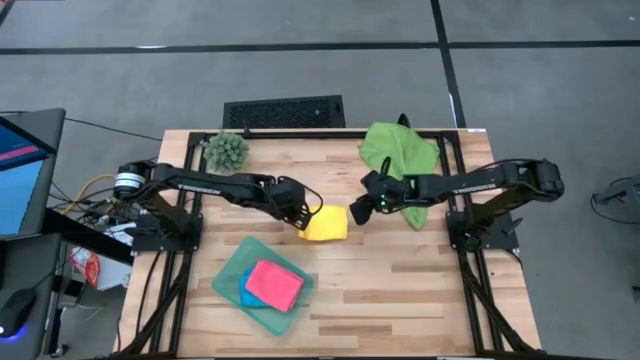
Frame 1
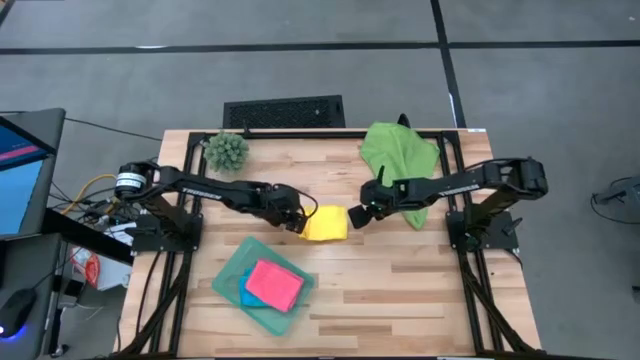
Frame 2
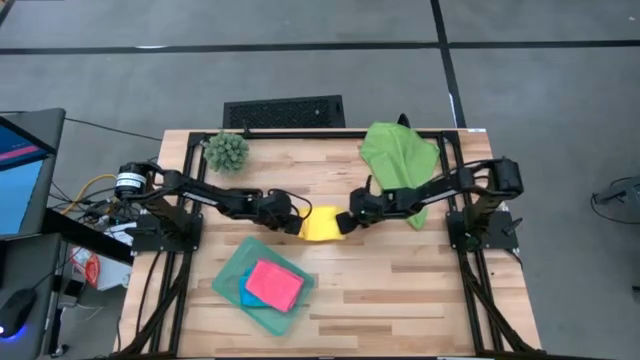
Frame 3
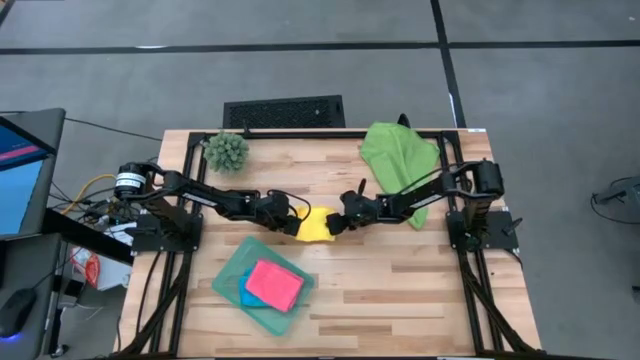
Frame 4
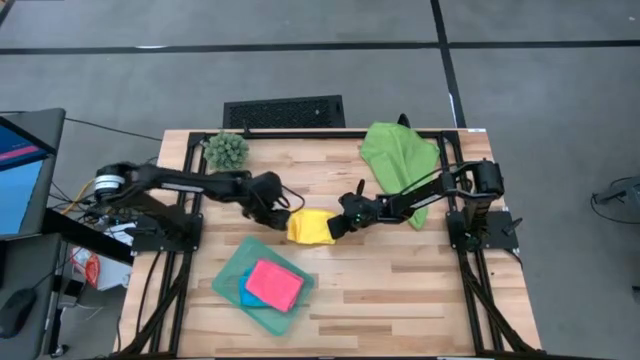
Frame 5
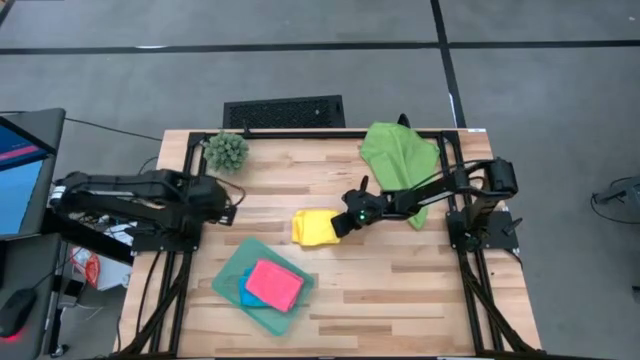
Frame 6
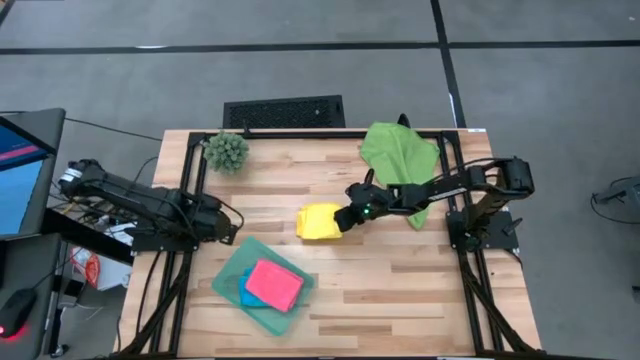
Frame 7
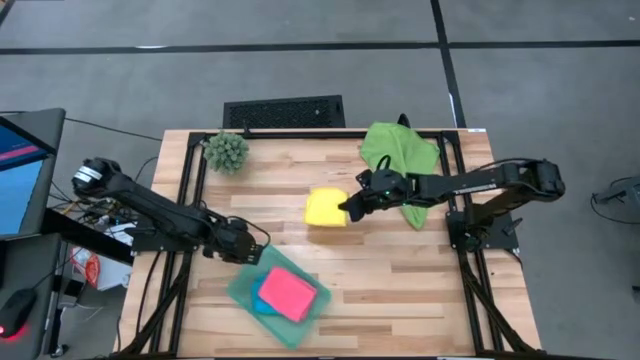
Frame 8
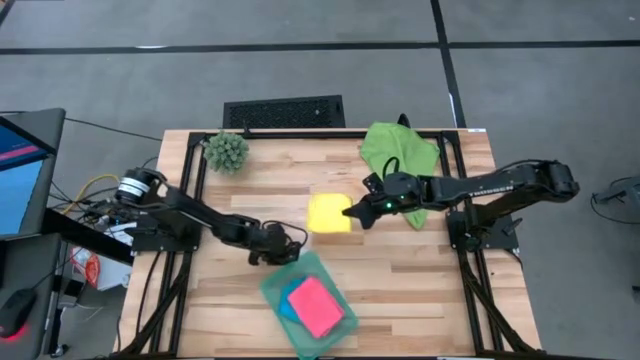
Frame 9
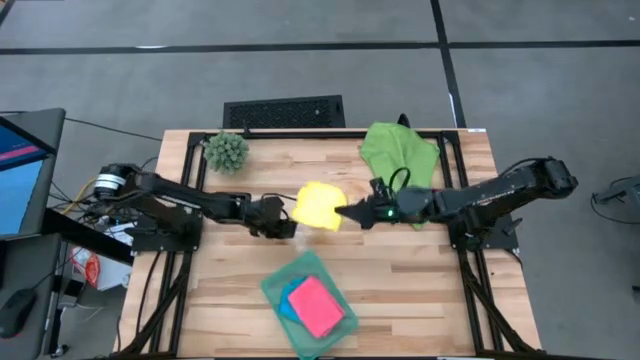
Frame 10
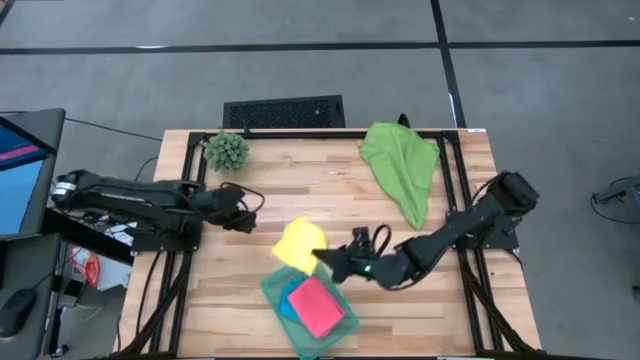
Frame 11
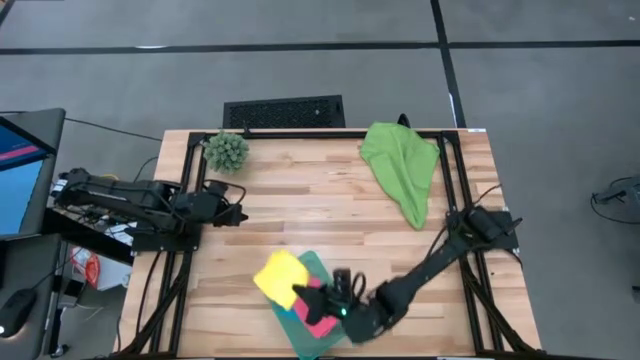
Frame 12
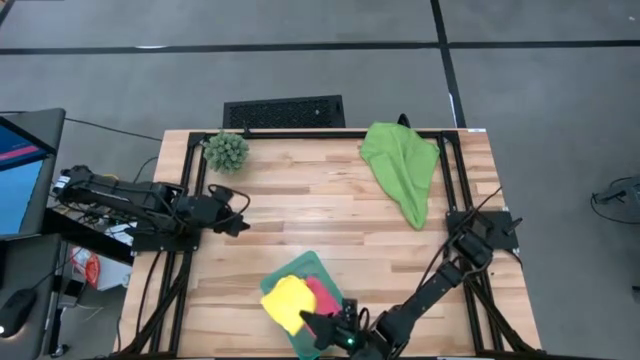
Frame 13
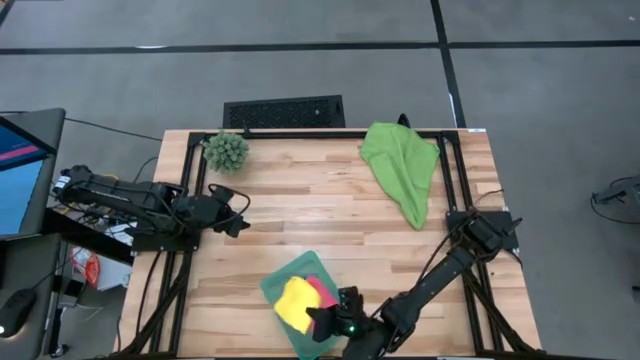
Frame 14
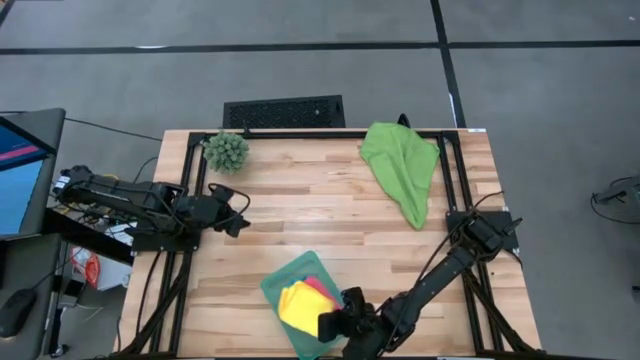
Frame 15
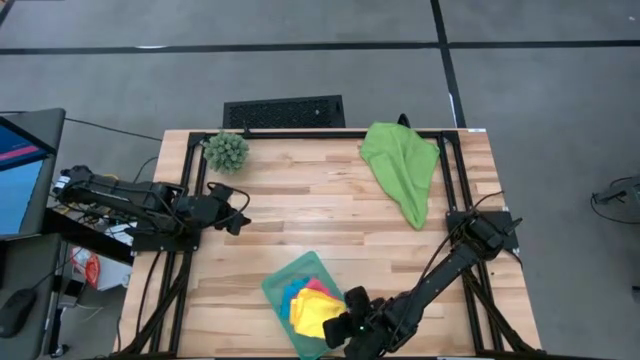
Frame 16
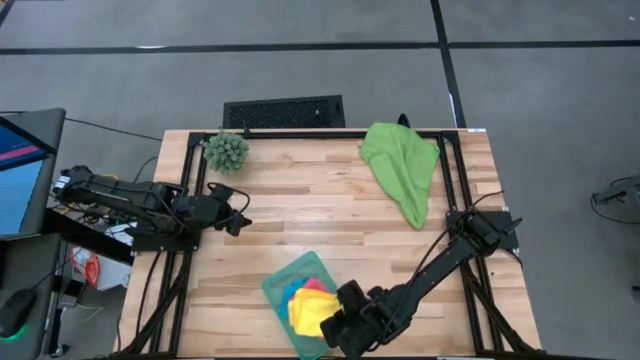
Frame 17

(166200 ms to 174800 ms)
Task: Fold microfiber towels
Put the folded yellow microfiber towel into the bin

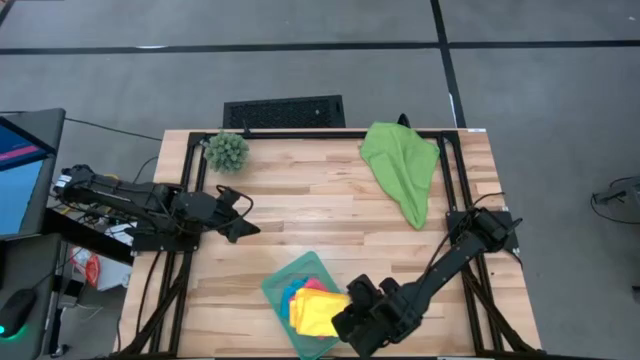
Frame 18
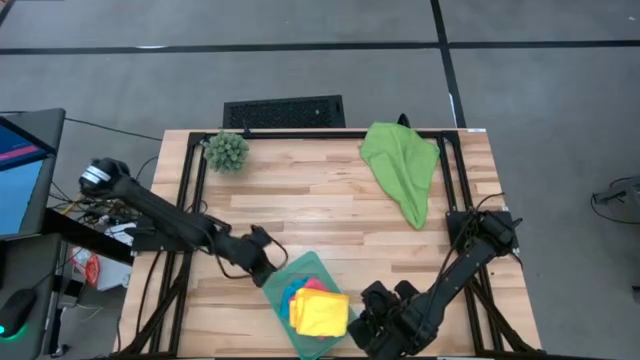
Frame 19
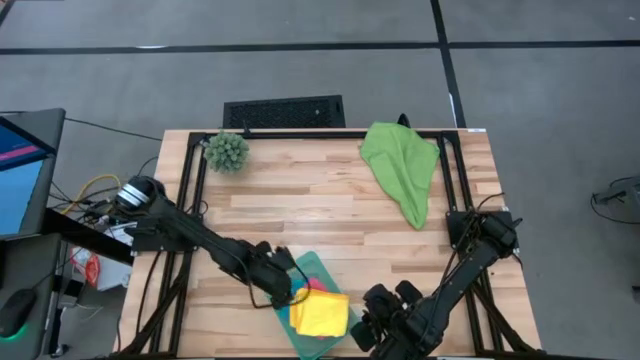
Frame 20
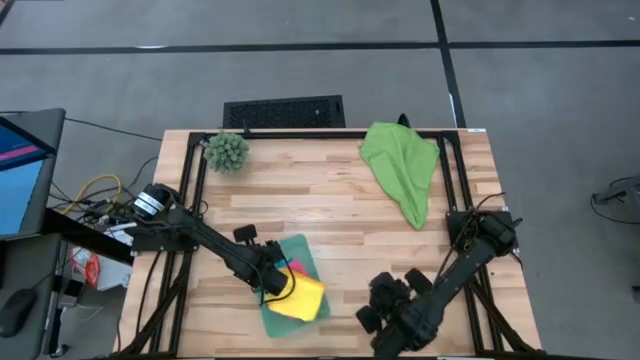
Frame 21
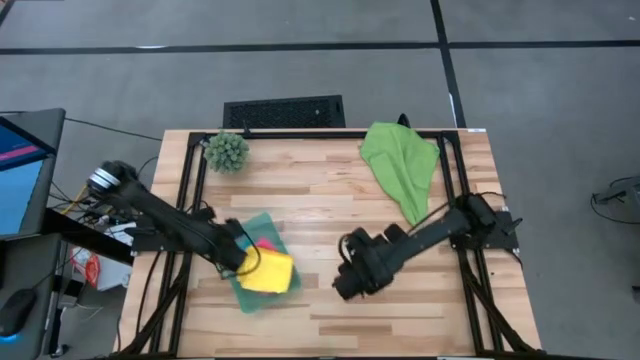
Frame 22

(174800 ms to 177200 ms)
Move the bin to the middle left of the table

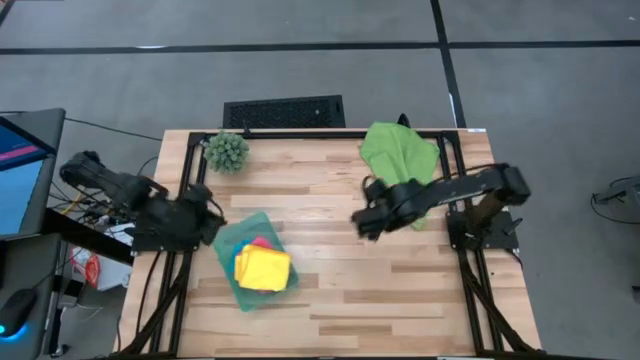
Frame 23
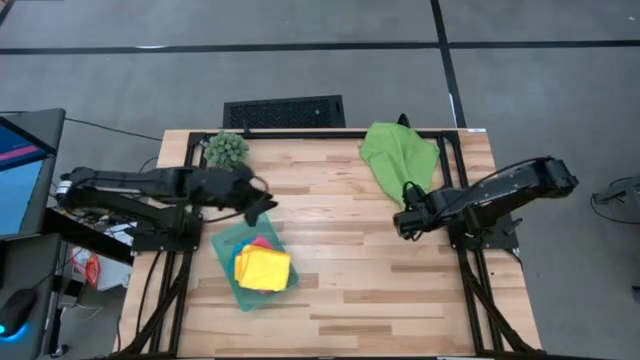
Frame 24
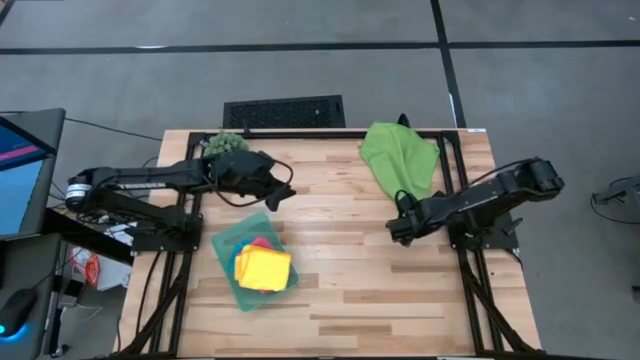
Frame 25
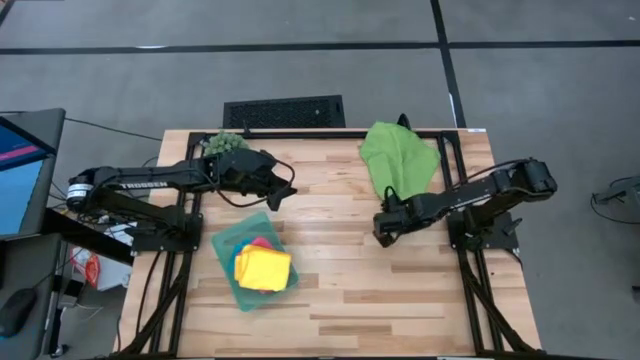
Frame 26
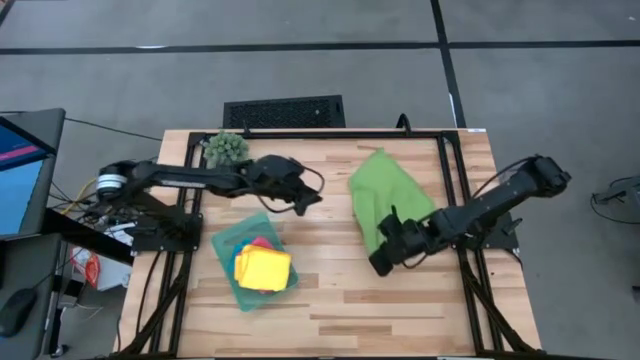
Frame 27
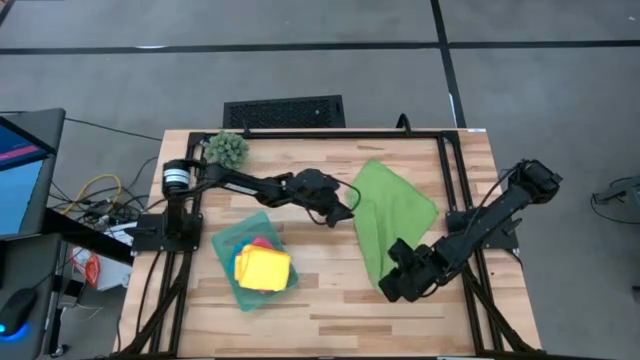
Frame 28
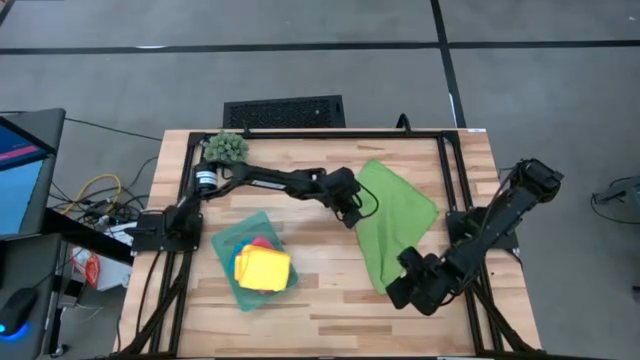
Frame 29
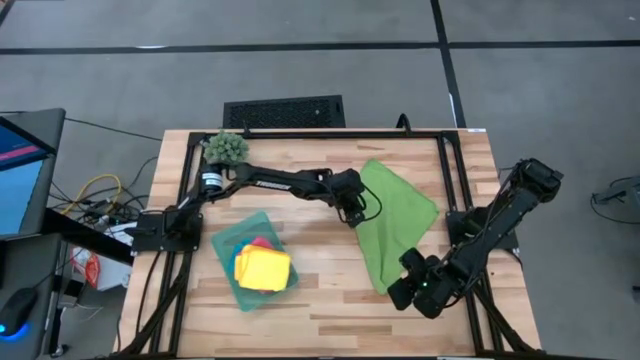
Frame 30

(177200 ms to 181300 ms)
Fold the green microfiber towel

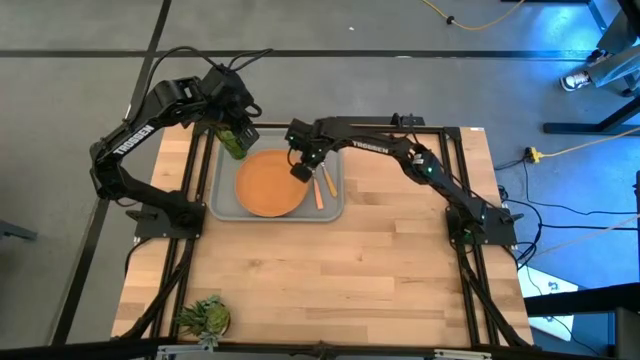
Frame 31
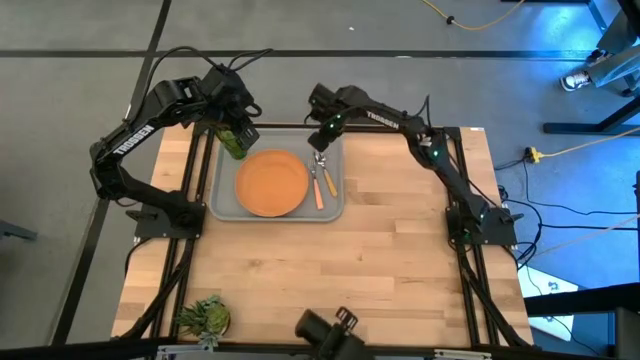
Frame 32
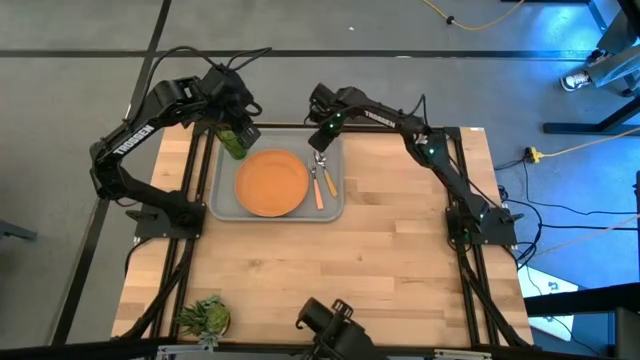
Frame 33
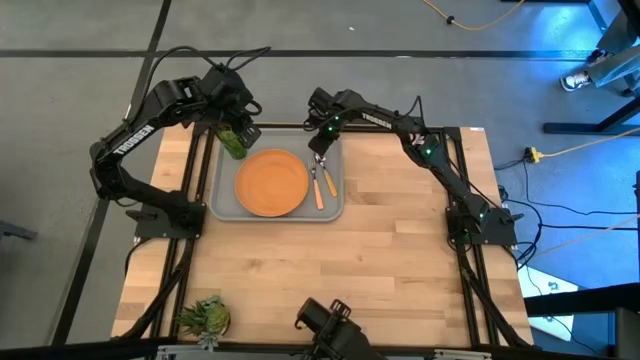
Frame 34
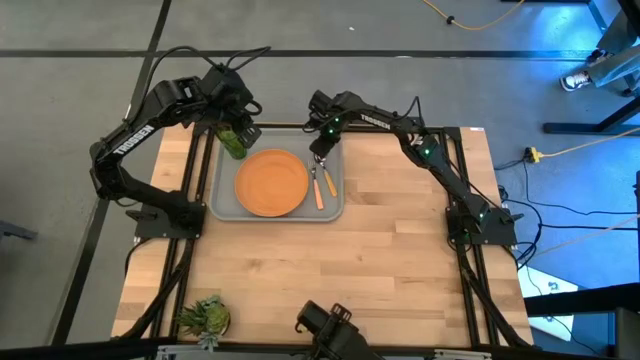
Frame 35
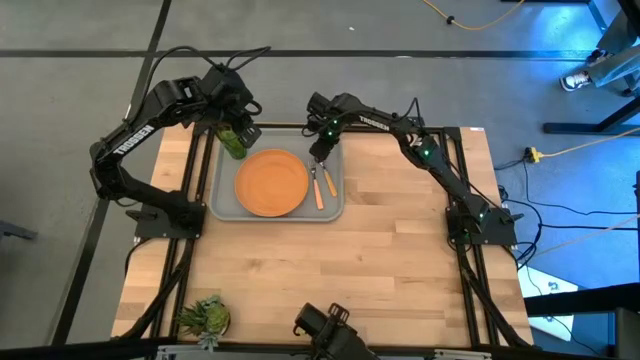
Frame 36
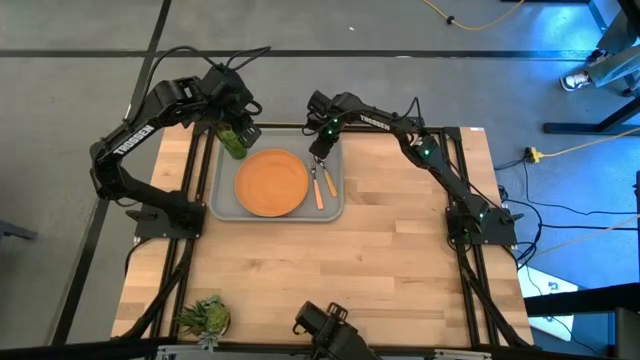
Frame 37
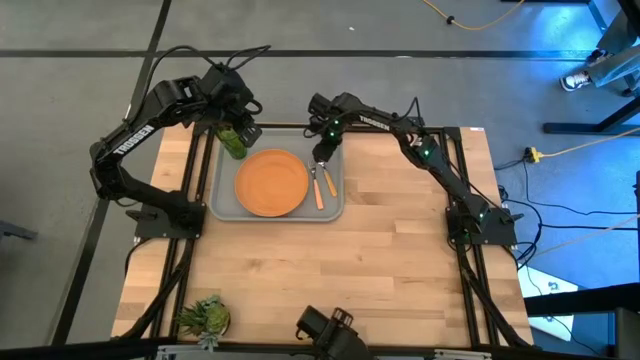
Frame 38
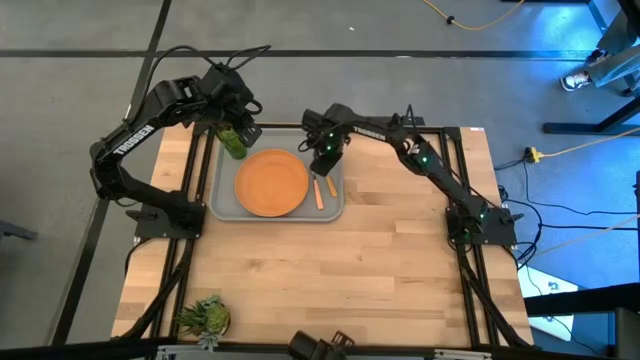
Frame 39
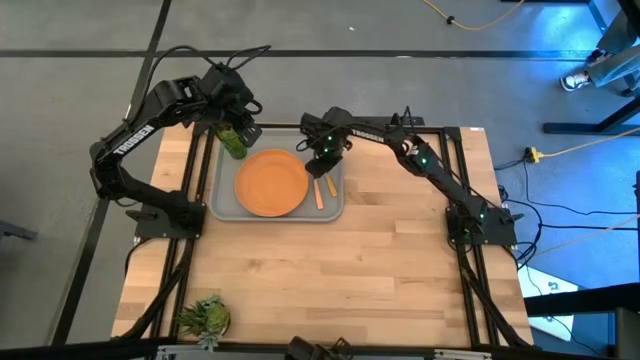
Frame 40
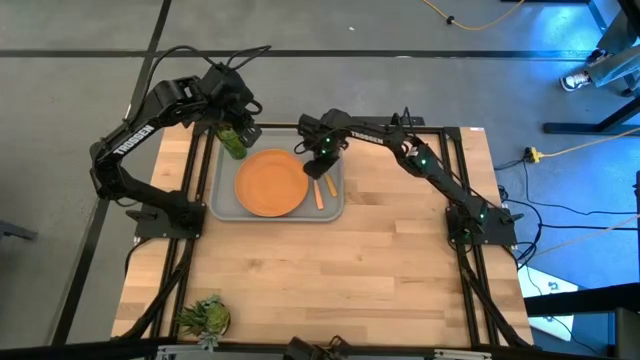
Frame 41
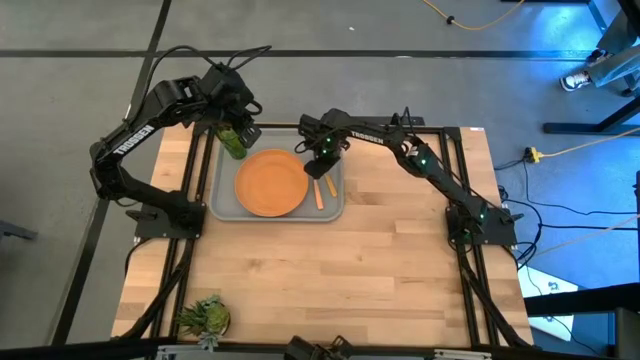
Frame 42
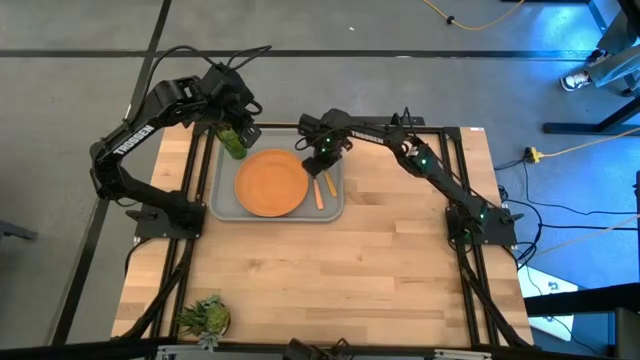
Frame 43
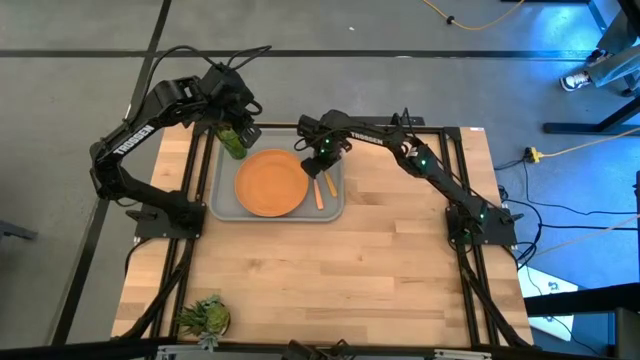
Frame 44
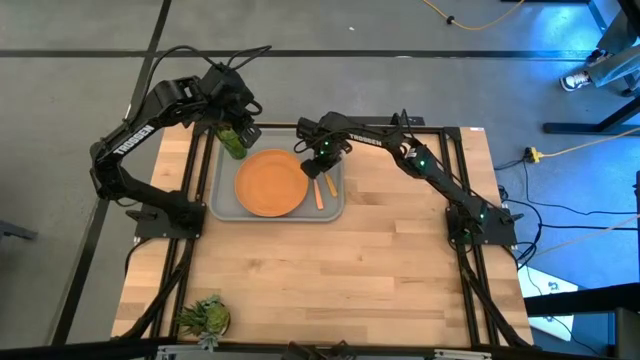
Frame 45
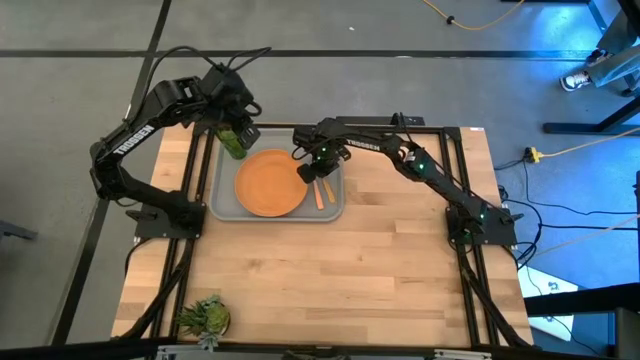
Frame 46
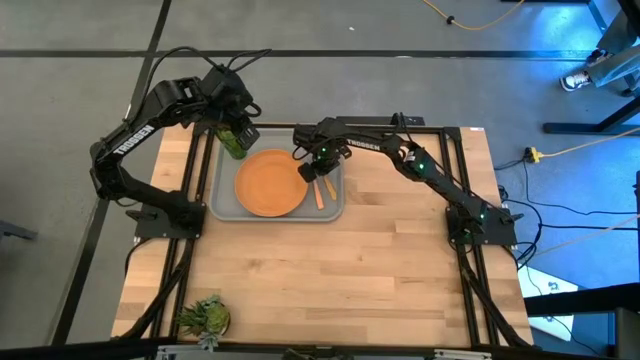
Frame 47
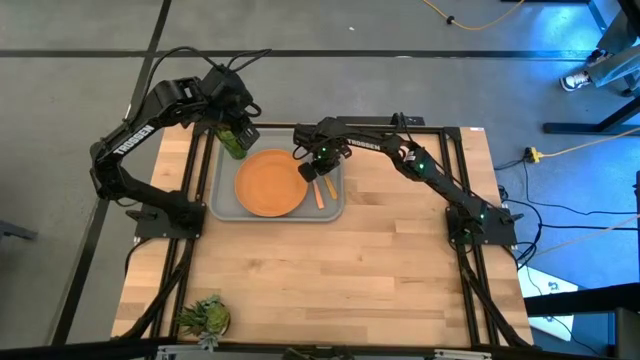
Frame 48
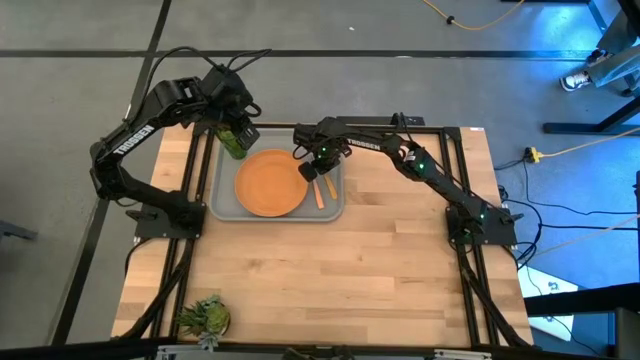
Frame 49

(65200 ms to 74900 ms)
Task: Pick and place plate/cup/fork/spoon on tray
Adjust the orange spoon on the gray serving tray
